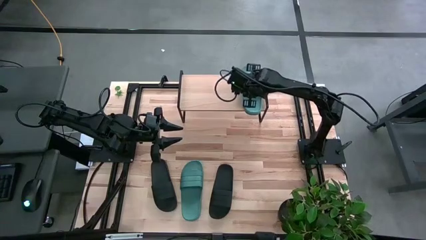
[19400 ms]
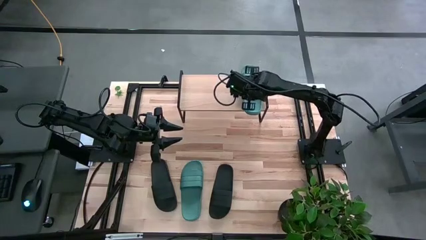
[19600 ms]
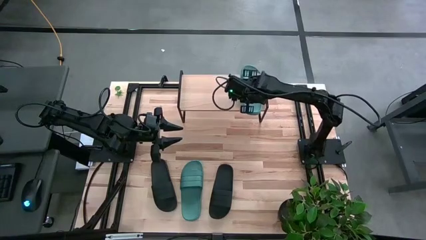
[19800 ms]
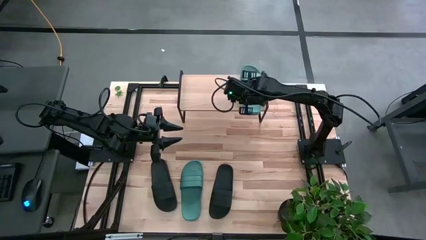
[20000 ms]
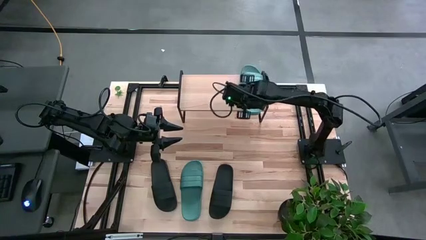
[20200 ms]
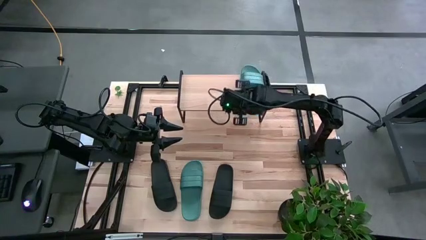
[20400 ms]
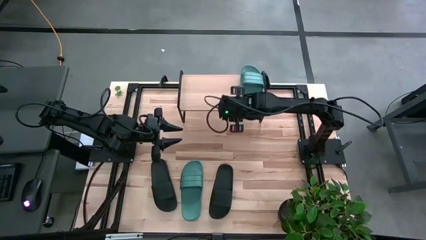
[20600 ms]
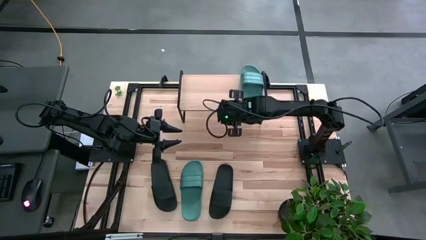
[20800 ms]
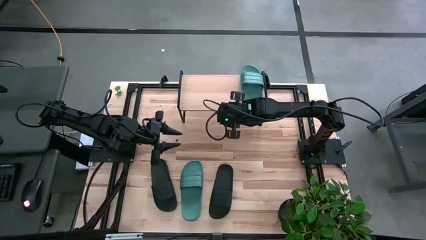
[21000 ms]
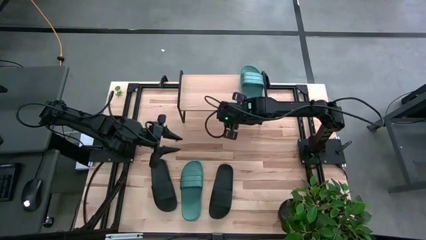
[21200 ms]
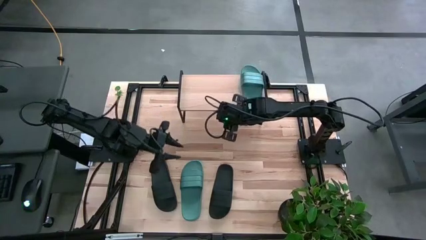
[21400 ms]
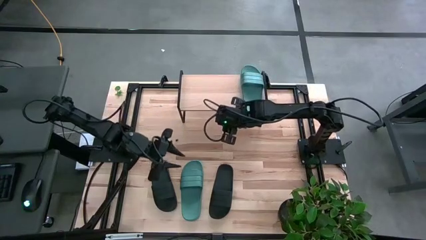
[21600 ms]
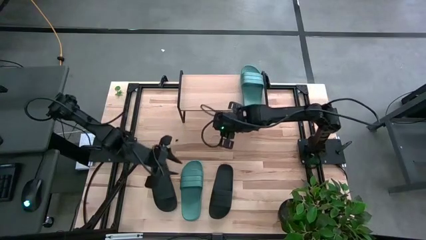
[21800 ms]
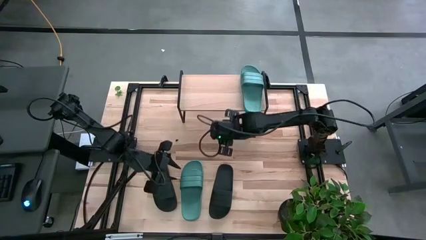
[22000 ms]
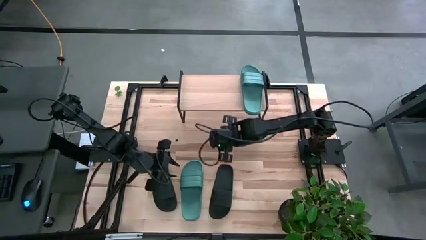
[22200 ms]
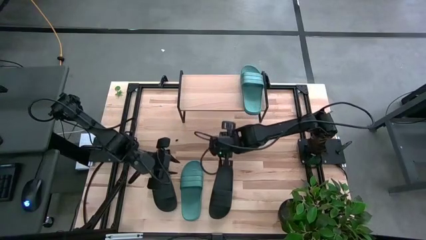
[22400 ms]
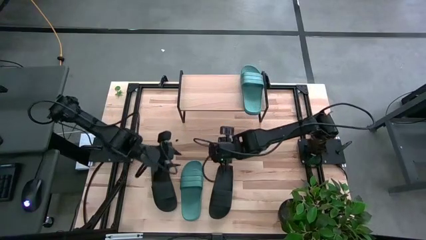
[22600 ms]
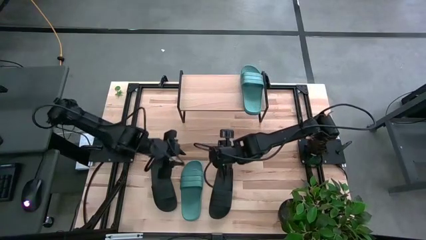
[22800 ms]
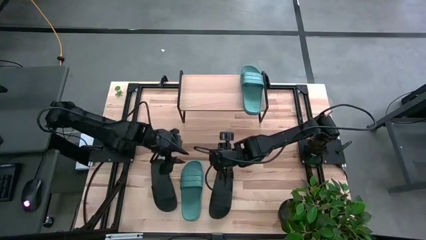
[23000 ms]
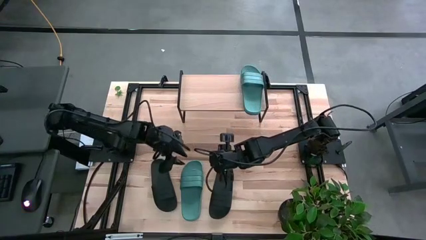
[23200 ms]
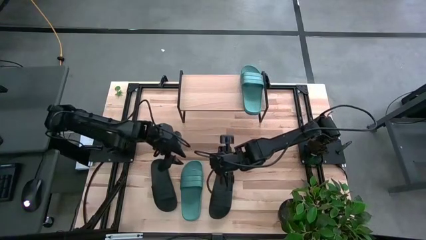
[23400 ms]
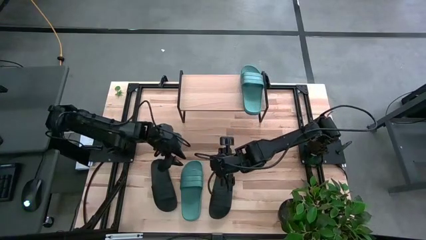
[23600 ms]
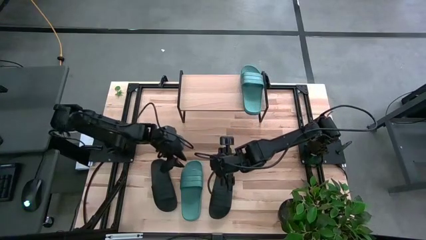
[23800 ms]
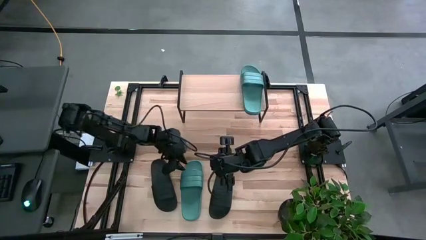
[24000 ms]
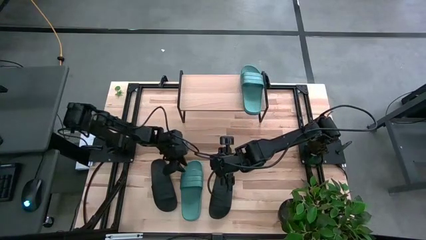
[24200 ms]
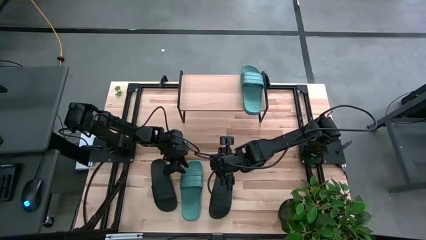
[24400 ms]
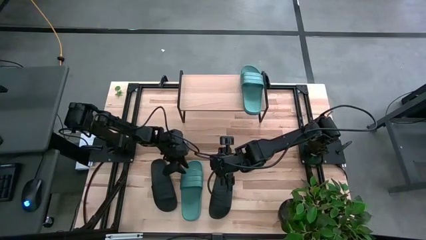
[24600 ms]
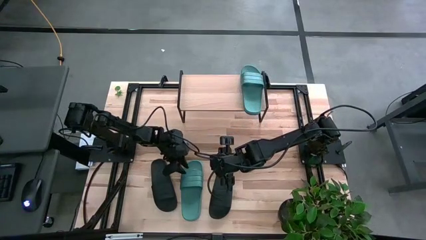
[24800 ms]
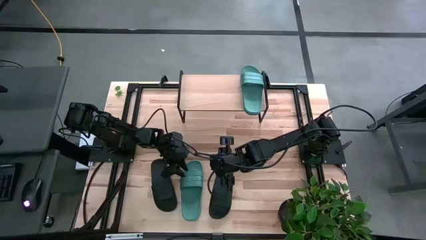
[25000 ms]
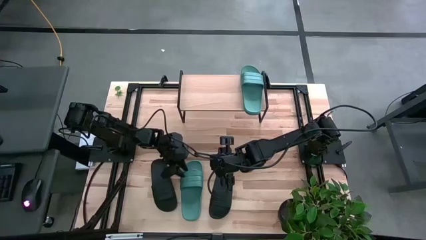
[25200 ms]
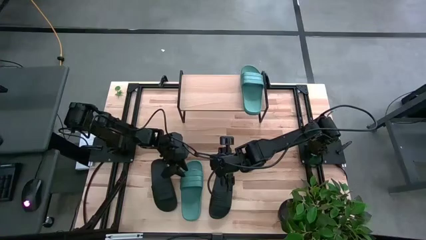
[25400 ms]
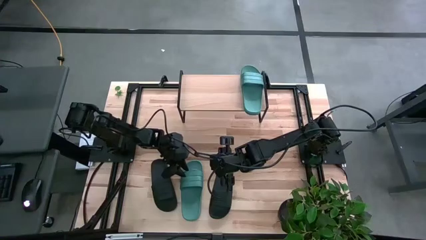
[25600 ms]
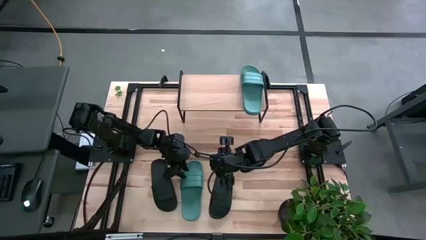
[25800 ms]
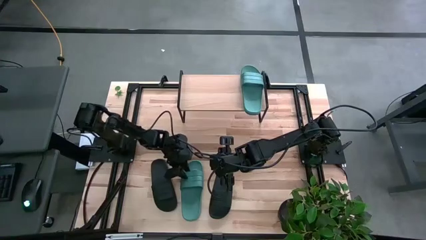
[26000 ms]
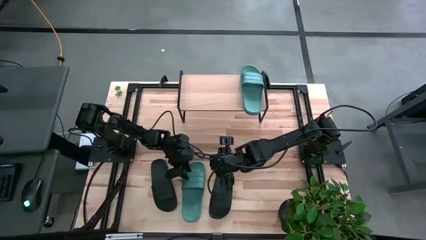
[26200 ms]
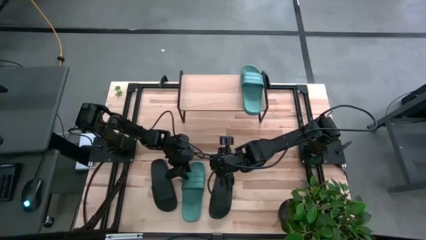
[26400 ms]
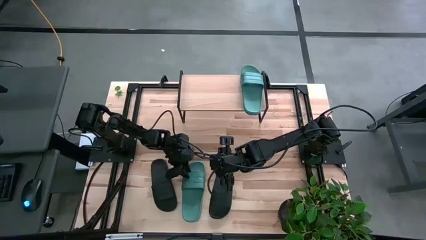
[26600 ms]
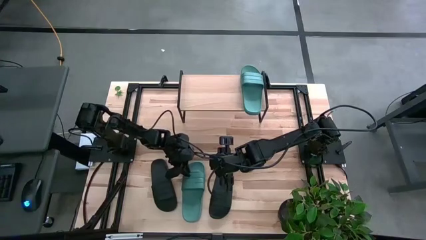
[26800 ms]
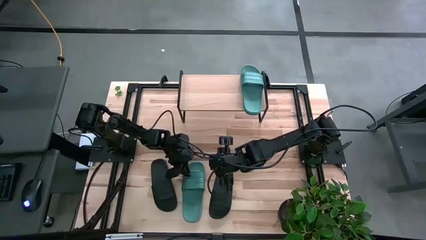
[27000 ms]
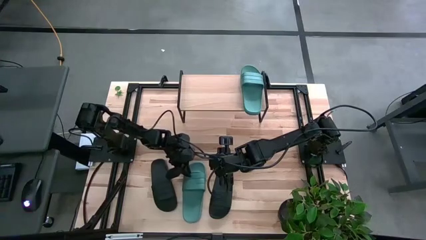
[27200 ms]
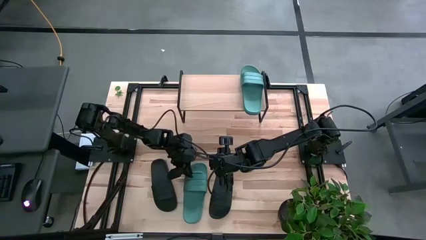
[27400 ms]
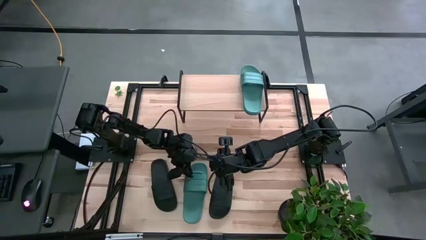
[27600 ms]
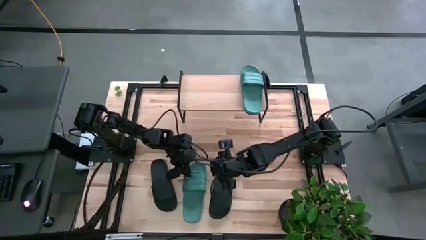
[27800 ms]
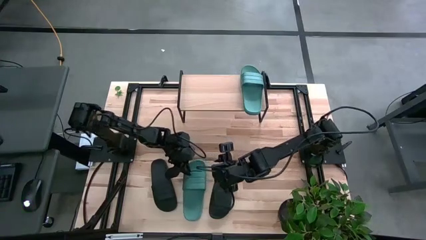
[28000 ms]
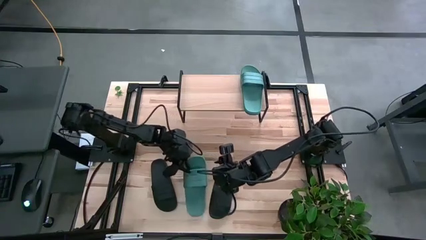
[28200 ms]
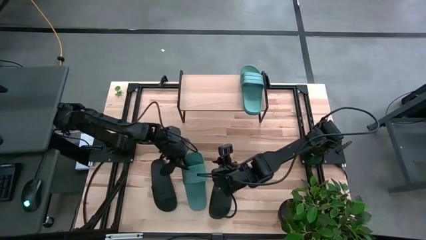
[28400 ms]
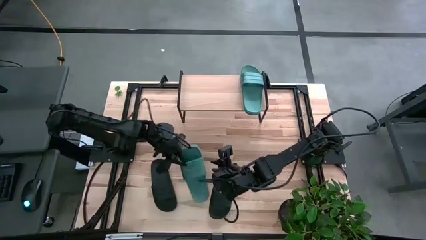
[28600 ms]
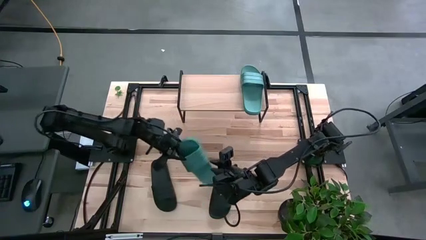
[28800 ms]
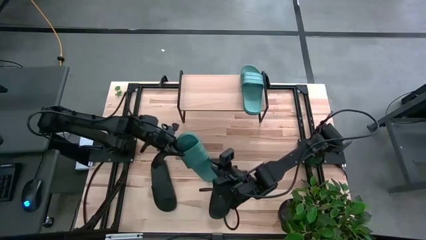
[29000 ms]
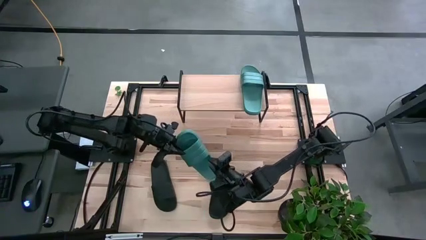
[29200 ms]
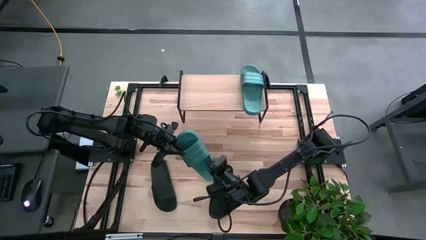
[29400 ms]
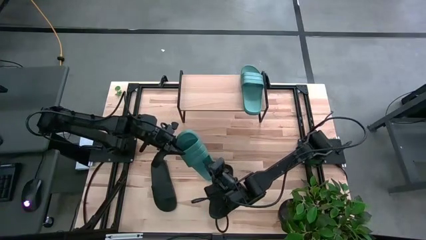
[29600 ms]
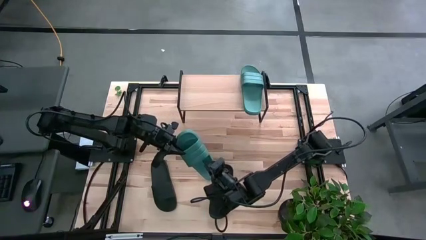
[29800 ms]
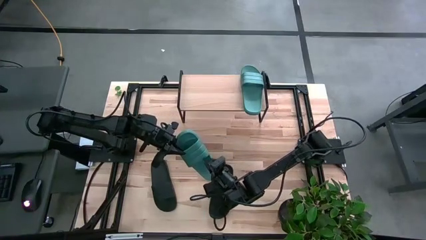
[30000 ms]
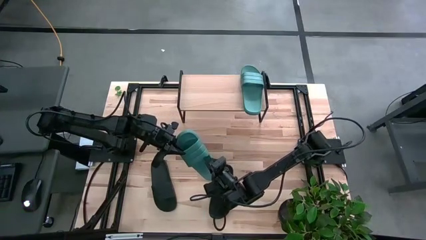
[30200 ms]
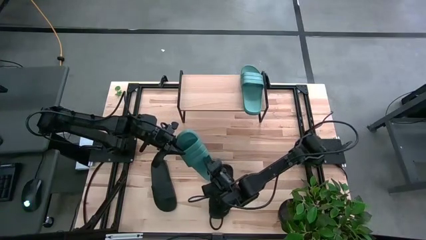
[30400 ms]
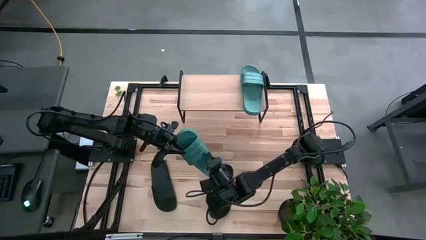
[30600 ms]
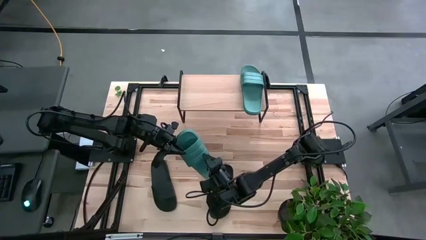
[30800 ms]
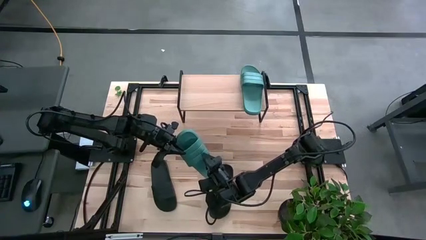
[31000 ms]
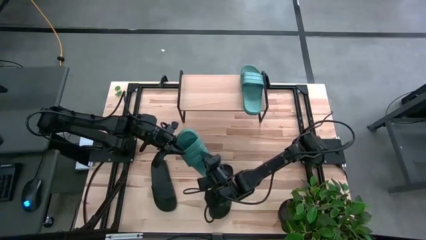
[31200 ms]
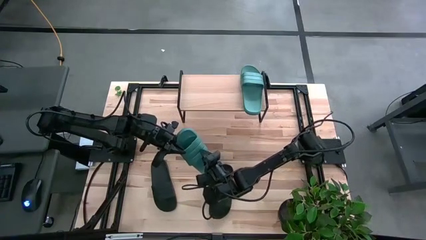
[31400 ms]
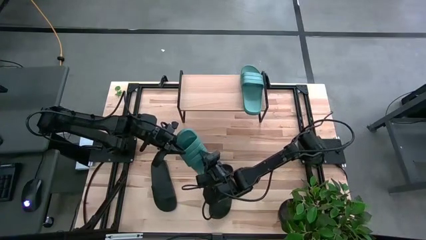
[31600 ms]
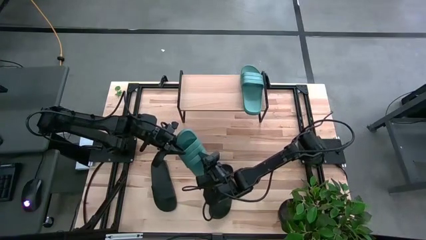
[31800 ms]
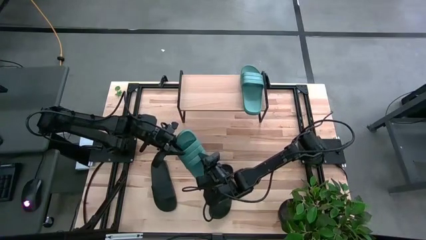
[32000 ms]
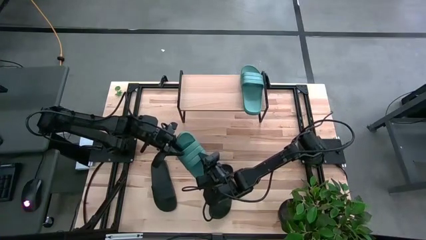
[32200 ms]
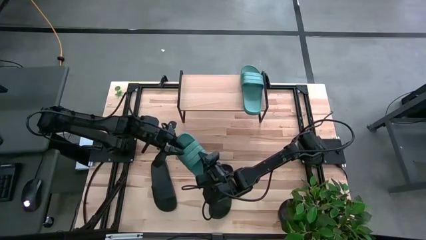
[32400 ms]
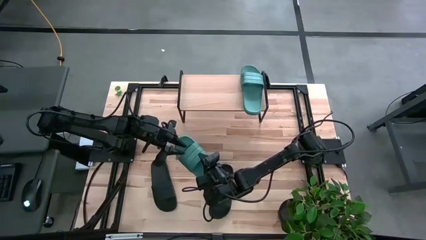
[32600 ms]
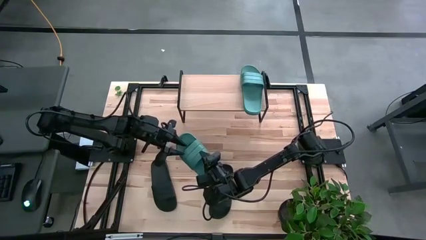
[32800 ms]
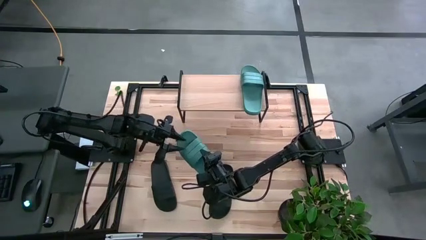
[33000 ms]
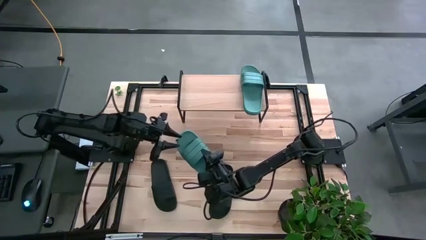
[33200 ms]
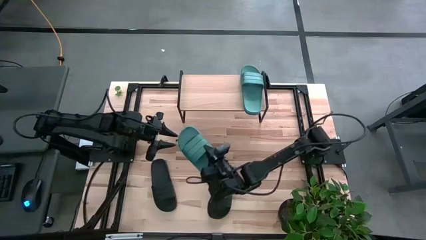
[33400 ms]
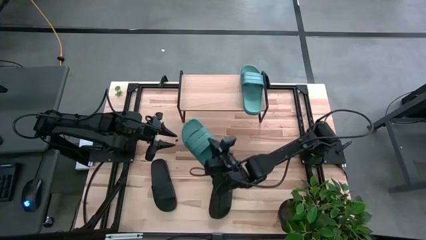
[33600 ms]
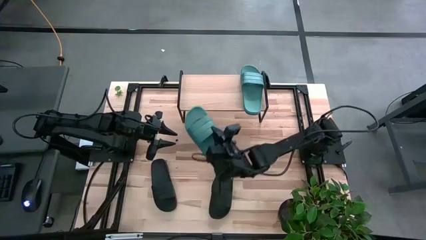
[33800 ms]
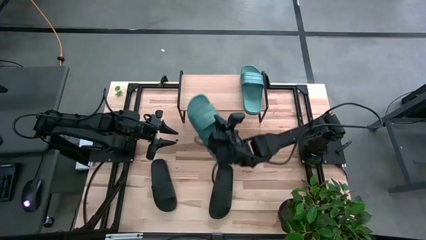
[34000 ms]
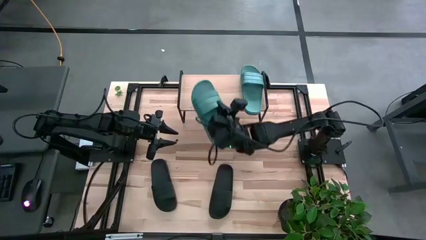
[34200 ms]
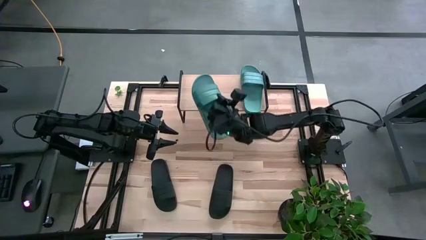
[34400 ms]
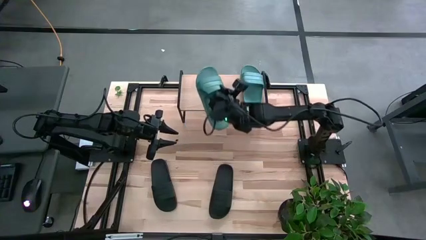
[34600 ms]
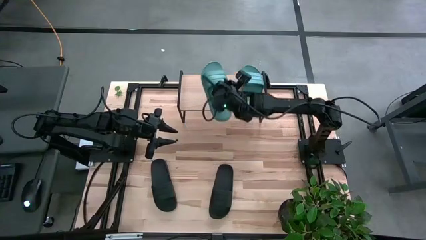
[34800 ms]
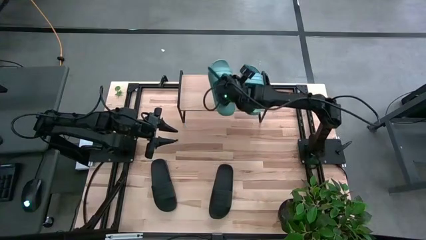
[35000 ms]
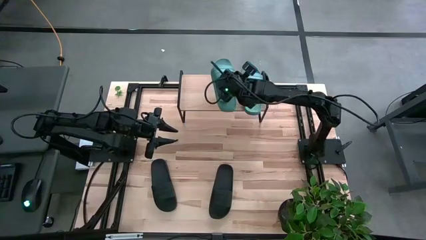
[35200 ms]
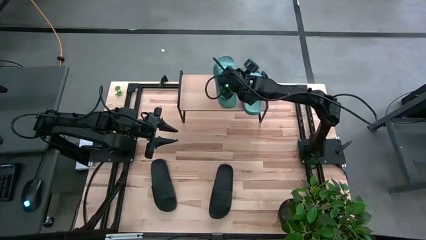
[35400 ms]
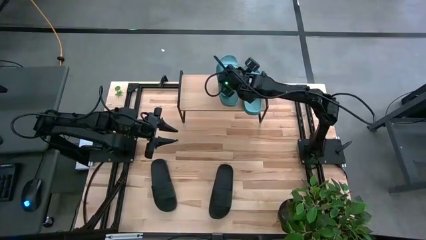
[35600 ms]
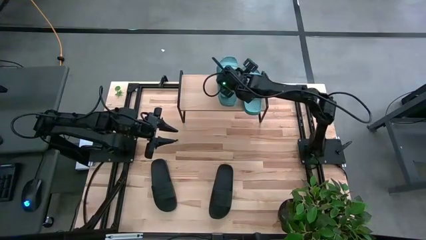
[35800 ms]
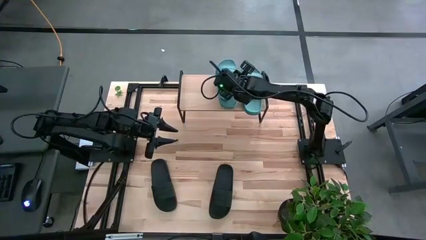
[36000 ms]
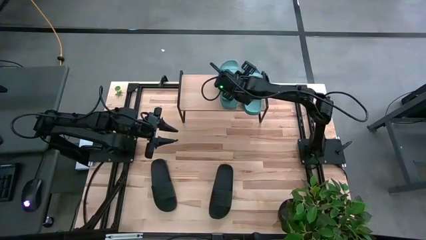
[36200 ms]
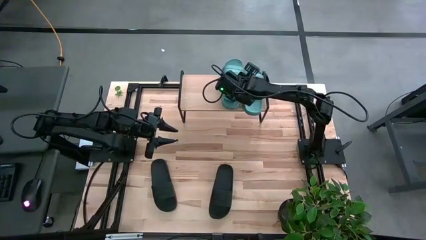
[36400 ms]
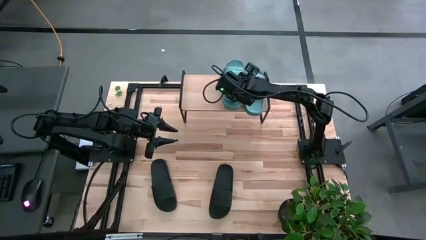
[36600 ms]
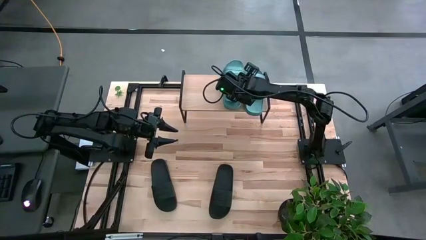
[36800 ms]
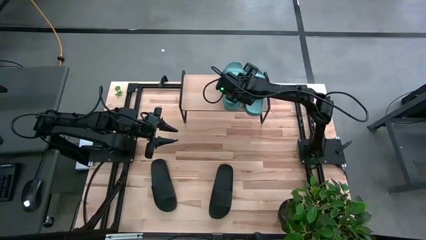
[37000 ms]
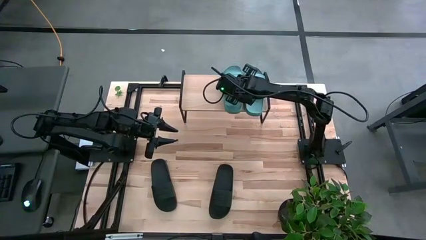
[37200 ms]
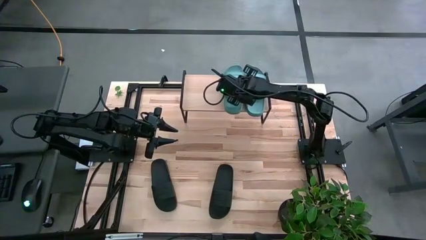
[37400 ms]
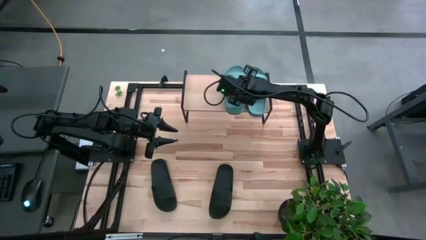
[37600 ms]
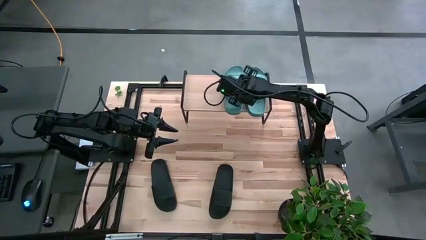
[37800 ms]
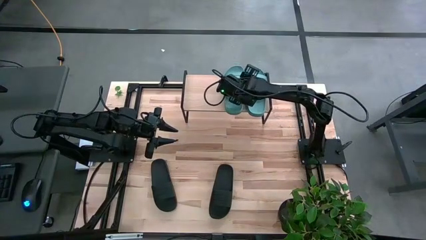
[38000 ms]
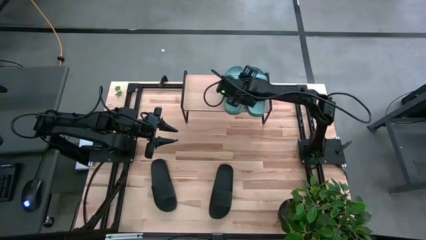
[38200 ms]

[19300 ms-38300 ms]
Task: Pick and place slides into the shelf
Put the green slide on the shelf
